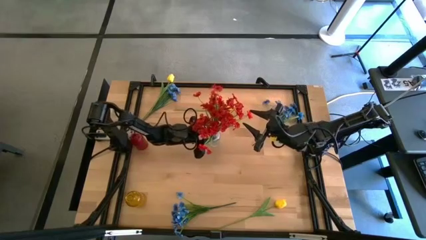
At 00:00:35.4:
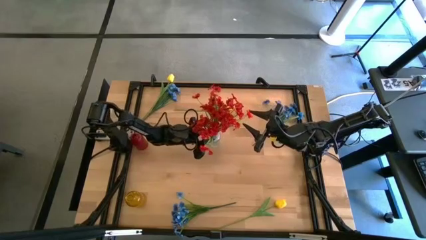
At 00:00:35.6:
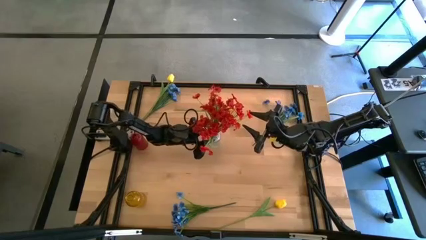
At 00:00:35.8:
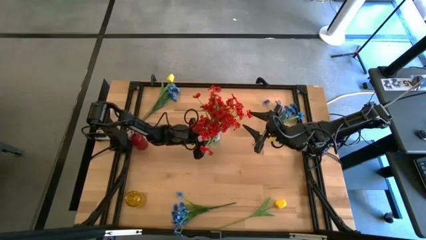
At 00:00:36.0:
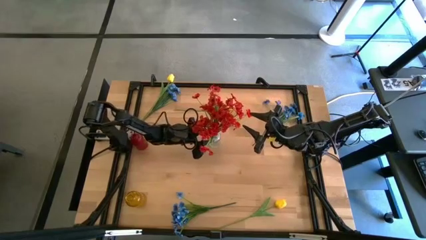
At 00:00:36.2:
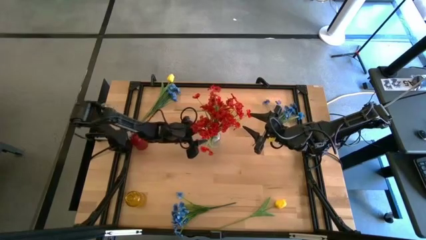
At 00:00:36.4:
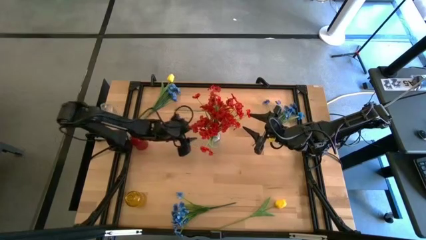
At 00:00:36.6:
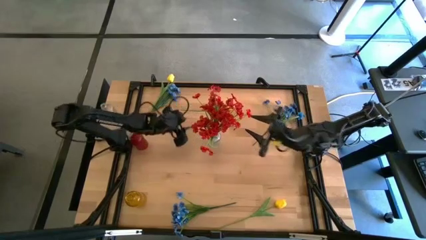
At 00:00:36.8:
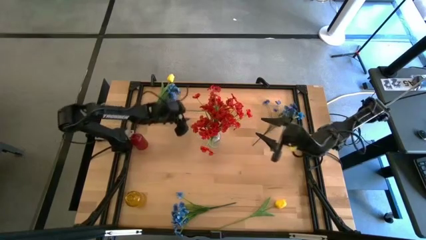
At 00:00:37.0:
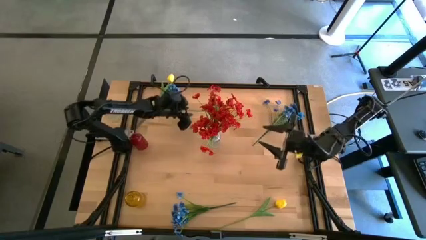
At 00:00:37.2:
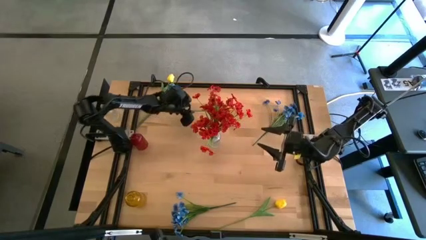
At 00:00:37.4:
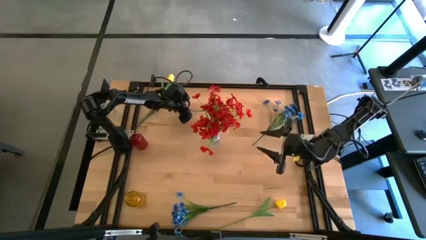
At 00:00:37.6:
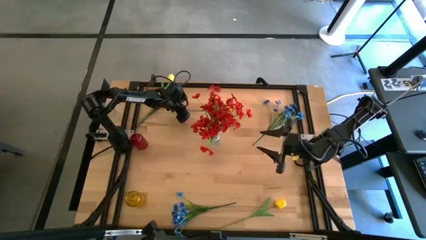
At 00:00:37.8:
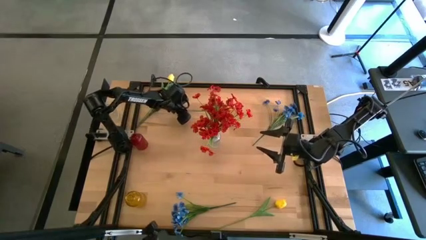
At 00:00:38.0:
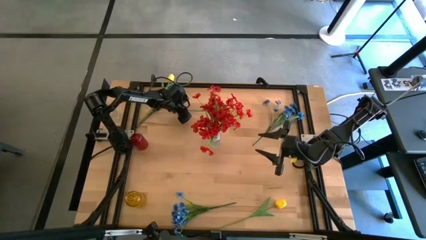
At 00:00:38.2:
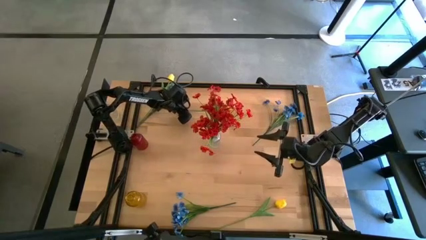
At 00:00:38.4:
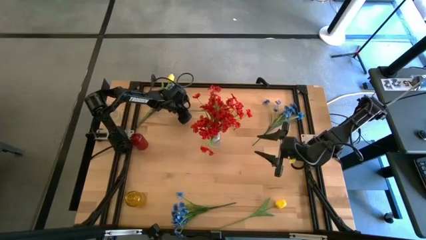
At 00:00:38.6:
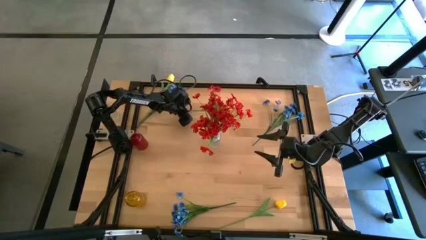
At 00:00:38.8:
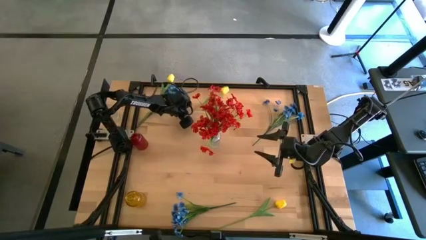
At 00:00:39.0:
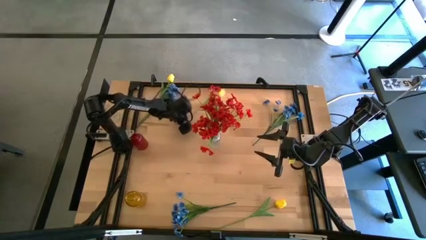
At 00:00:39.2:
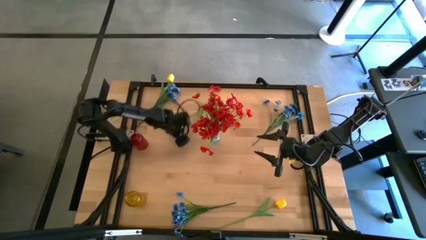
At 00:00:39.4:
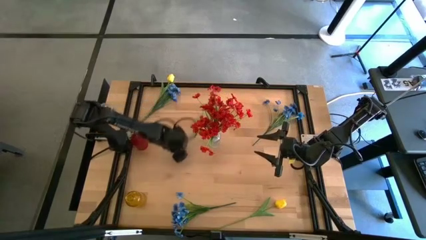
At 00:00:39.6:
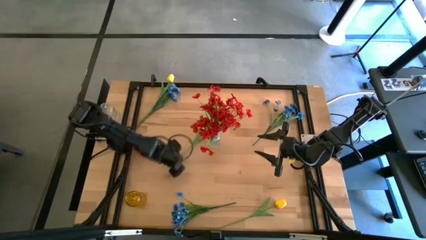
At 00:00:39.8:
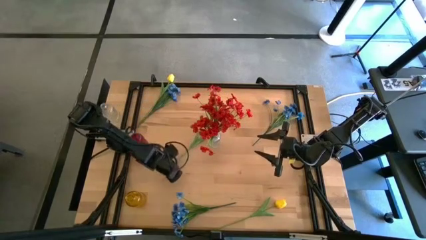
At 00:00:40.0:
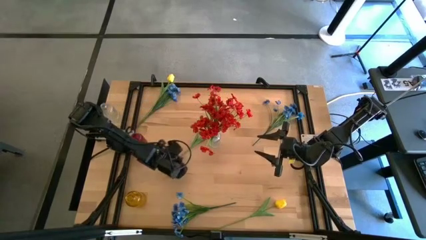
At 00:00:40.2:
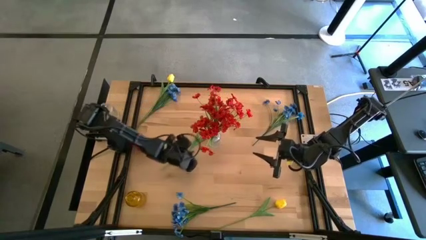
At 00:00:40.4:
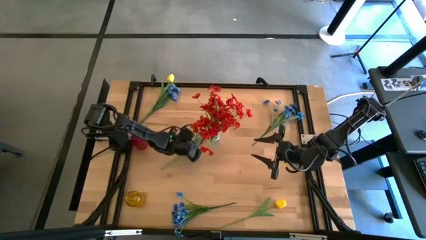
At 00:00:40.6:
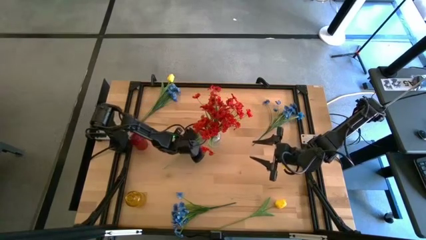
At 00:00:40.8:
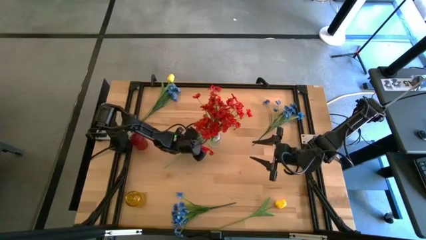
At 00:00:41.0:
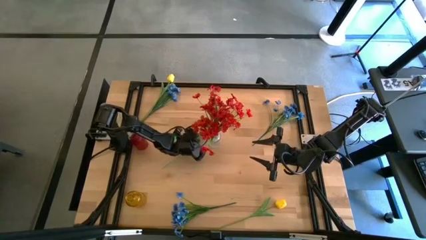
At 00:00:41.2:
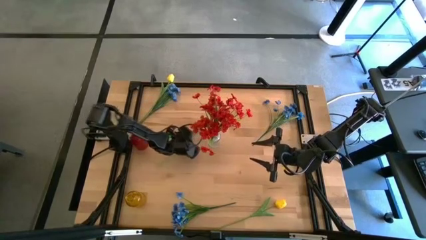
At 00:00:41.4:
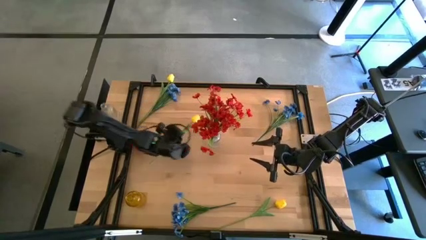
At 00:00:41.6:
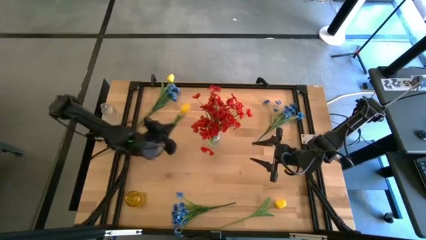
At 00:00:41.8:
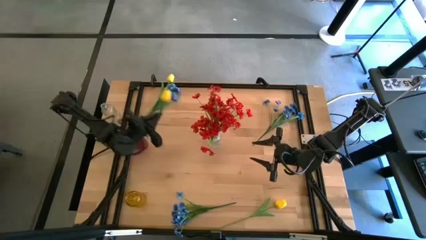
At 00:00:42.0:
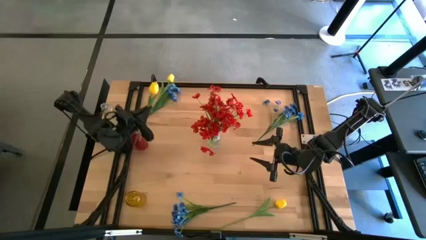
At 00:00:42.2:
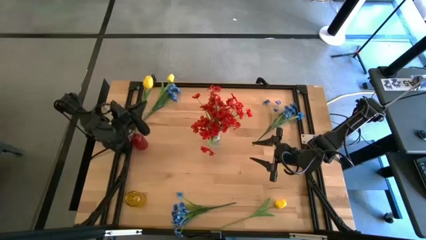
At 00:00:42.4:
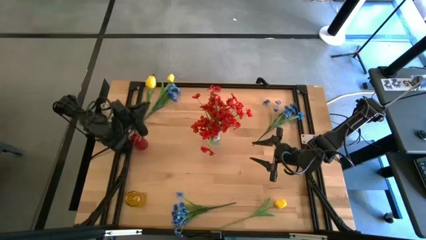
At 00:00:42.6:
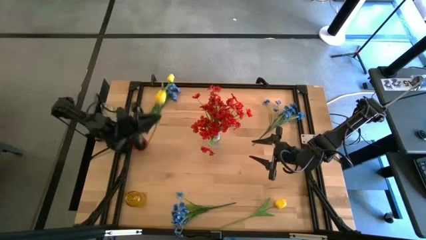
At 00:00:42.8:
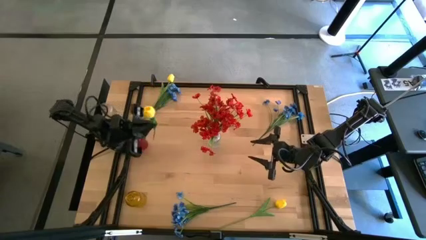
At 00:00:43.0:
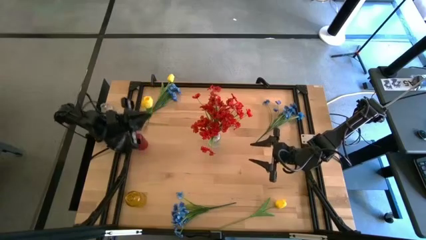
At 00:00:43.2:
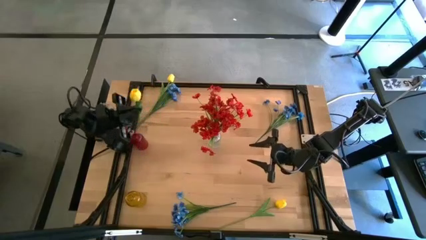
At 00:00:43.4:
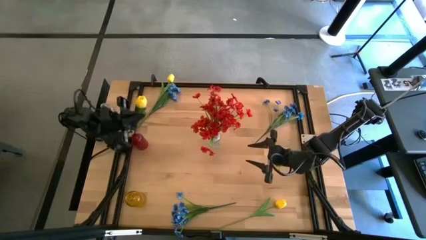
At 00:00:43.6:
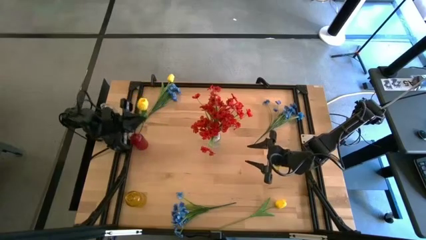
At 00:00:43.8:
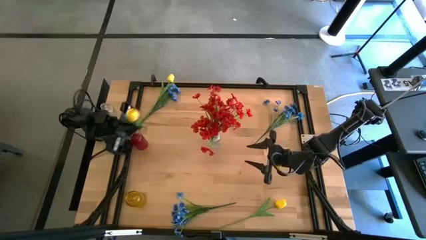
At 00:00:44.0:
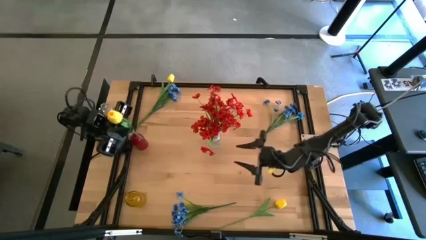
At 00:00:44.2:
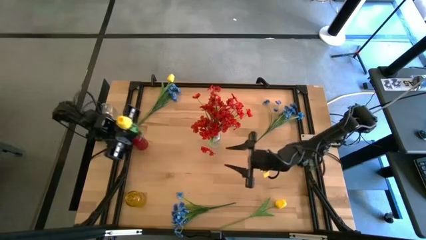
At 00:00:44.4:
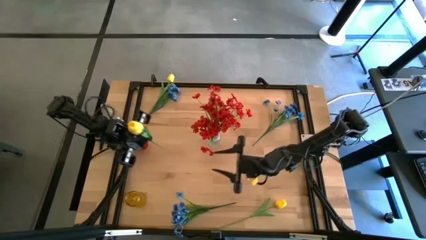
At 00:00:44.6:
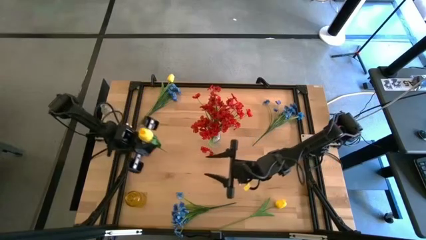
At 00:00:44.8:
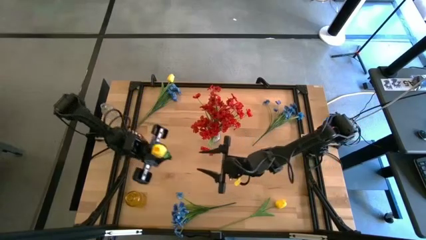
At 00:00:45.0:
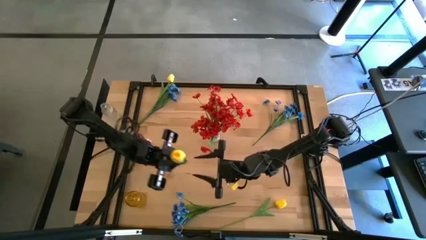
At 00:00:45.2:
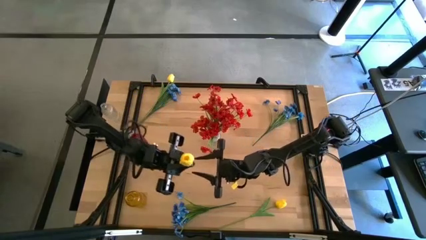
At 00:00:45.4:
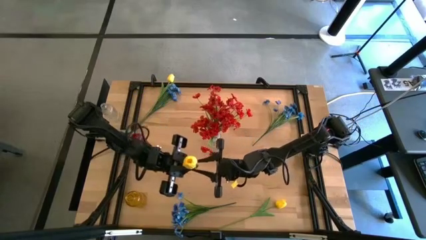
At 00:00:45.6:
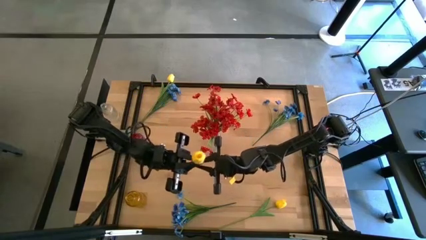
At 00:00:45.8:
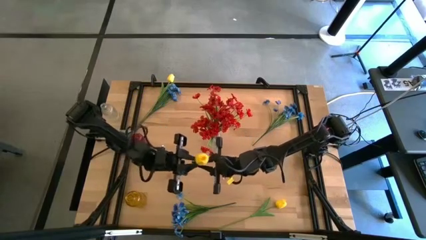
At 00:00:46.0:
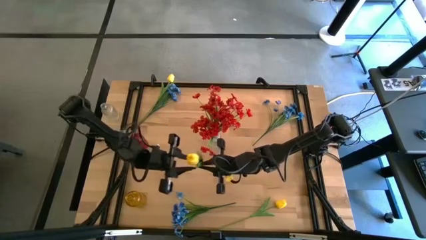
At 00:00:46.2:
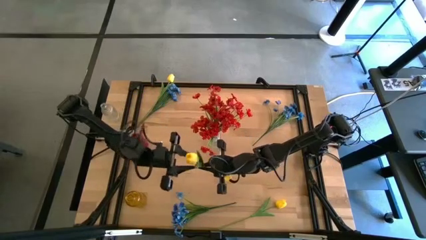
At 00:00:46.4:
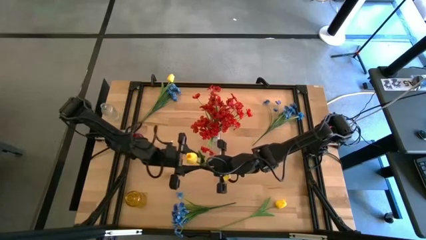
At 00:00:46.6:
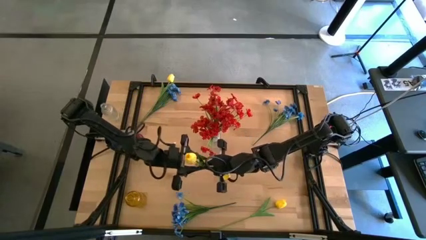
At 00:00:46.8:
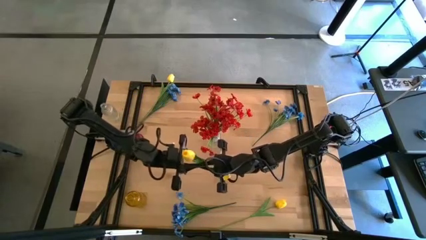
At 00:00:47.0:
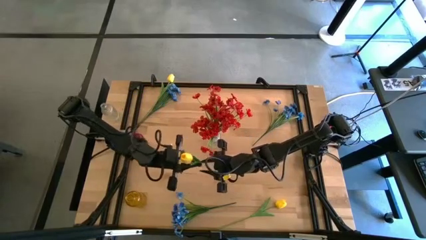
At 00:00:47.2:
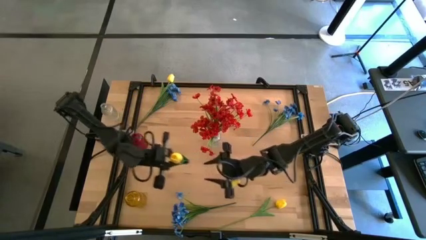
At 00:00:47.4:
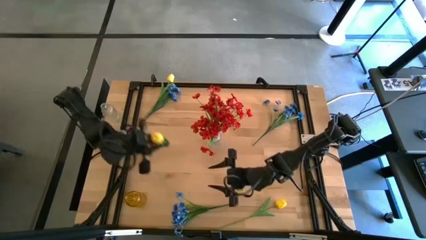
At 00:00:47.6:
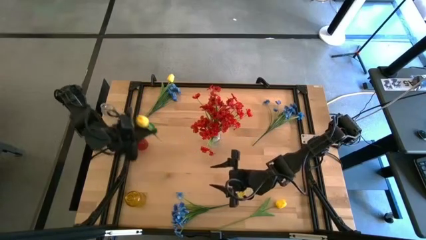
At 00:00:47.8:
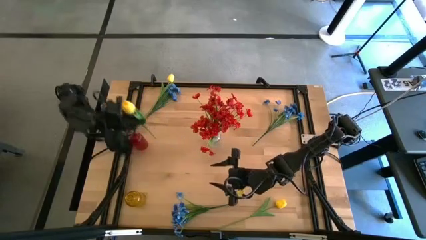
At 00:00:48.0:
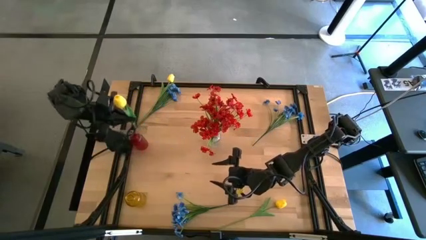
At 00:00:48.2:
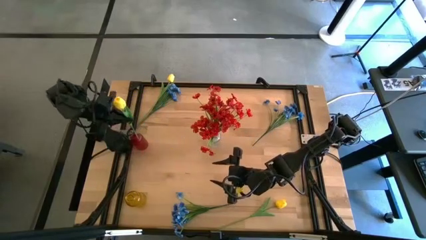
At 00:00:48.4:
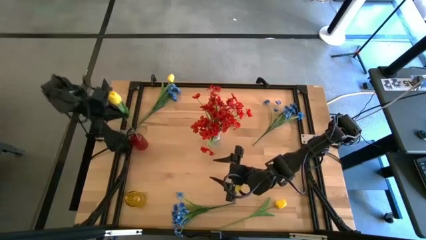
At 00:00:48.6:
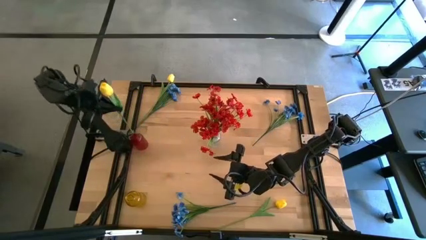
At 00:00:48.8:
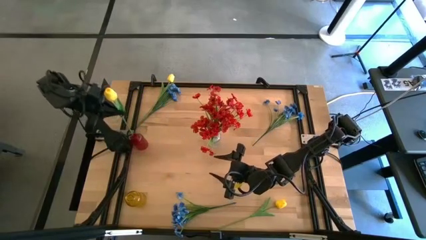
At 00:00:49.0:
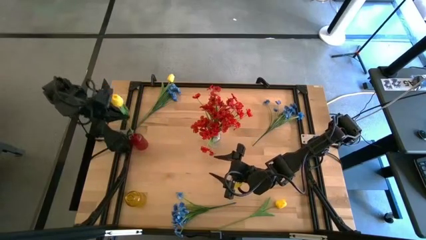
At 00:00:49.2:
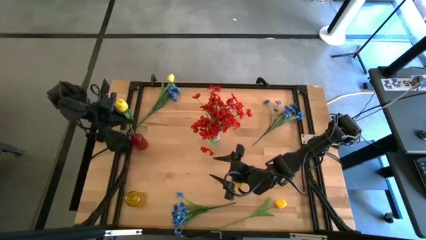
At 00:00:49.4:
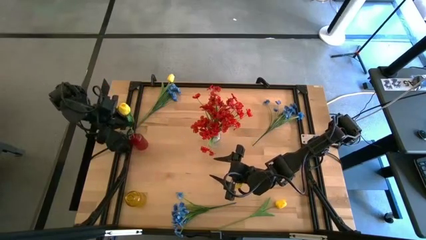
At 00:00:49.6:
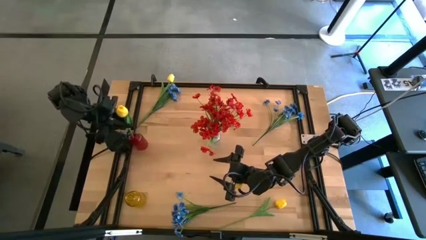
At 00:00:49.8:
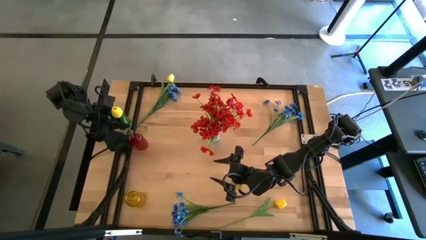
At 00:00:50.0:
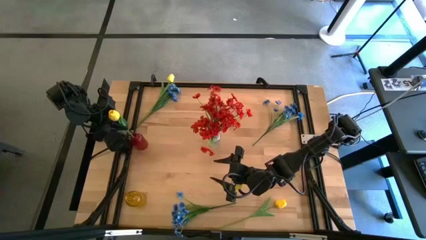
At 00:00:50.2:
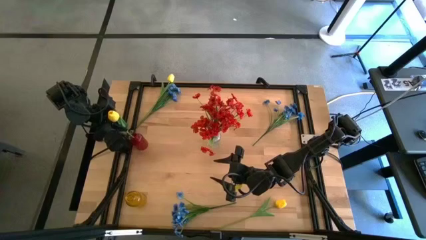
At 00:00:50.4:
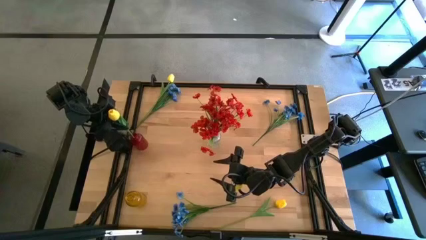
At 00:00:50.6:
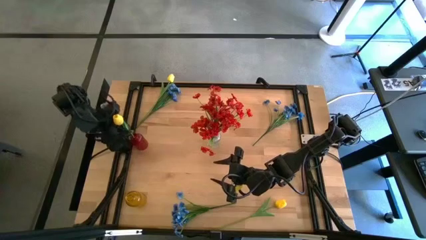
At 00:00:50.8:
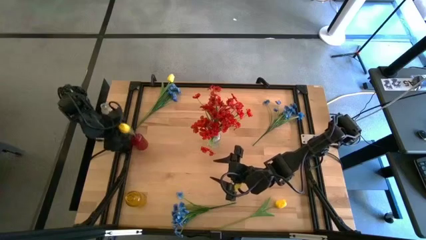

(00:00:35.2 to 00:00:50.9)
Task: Sort flowers into vase by color
Put the top right yellow flower into the red vase
